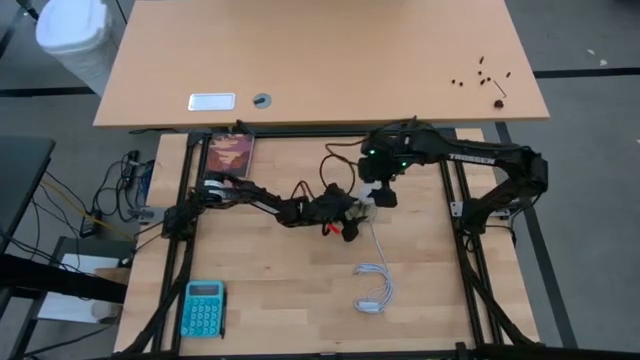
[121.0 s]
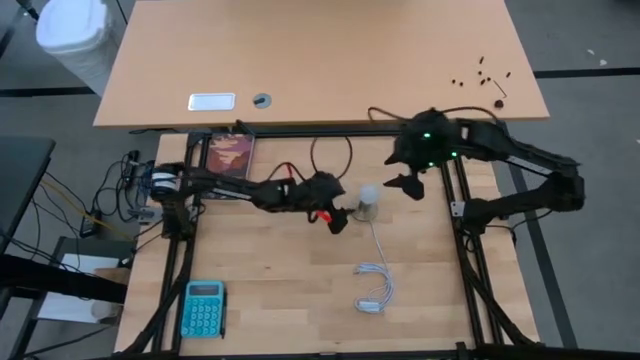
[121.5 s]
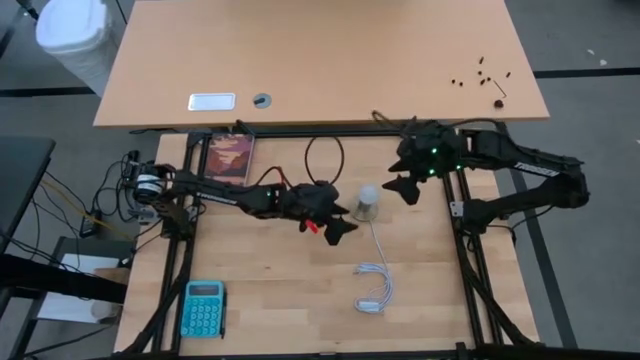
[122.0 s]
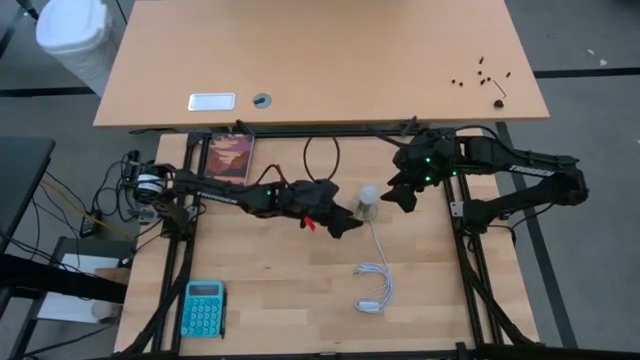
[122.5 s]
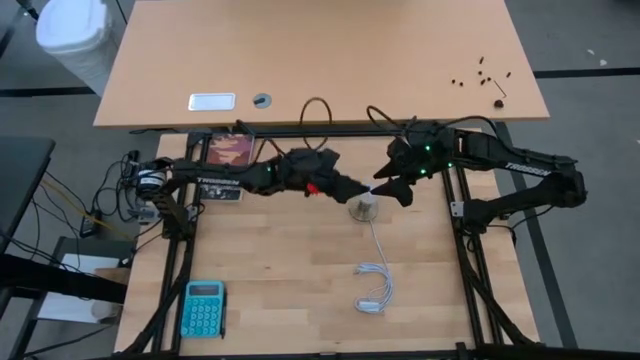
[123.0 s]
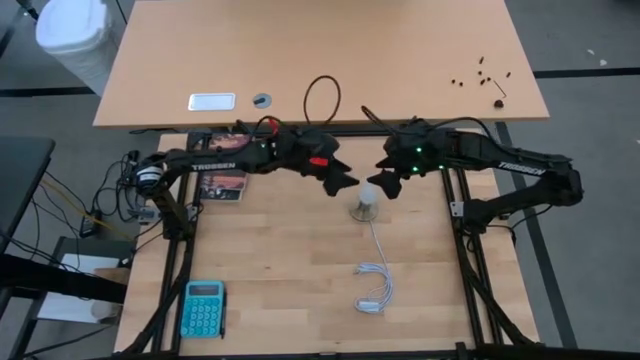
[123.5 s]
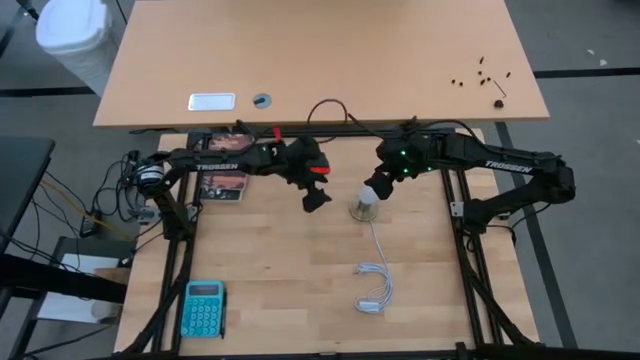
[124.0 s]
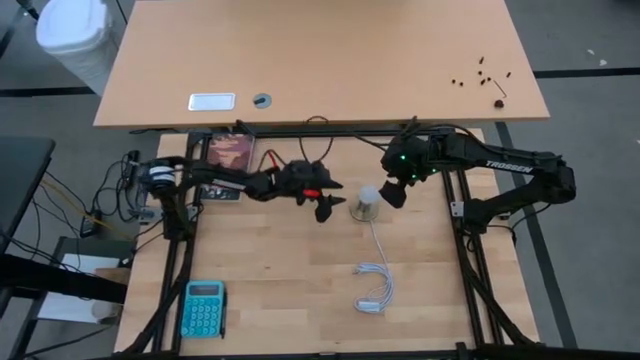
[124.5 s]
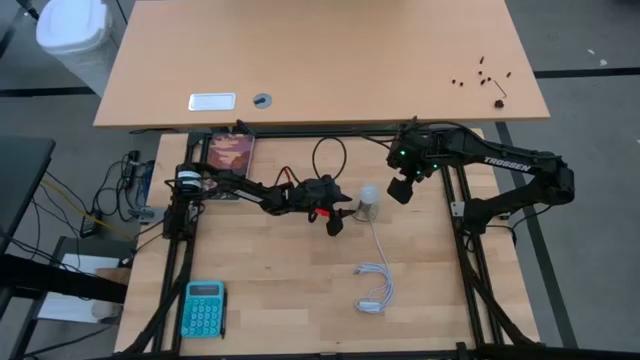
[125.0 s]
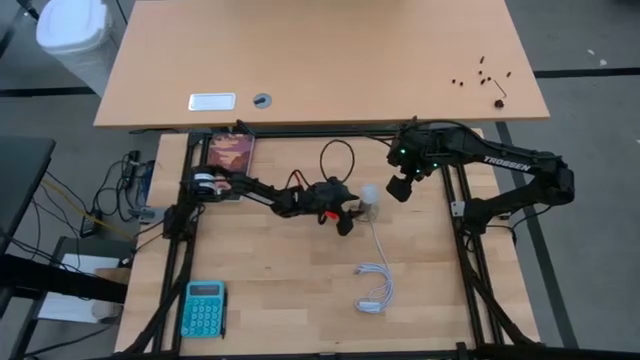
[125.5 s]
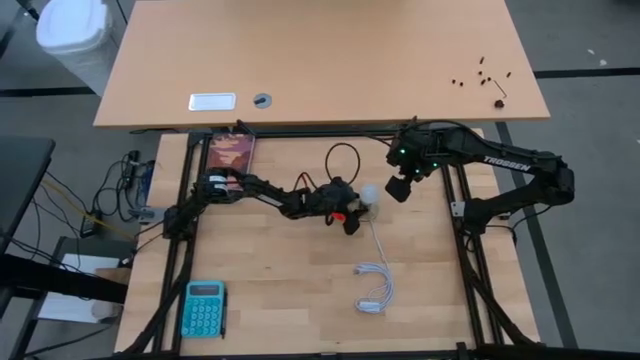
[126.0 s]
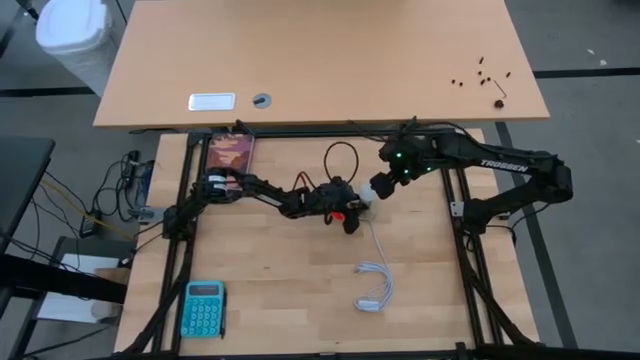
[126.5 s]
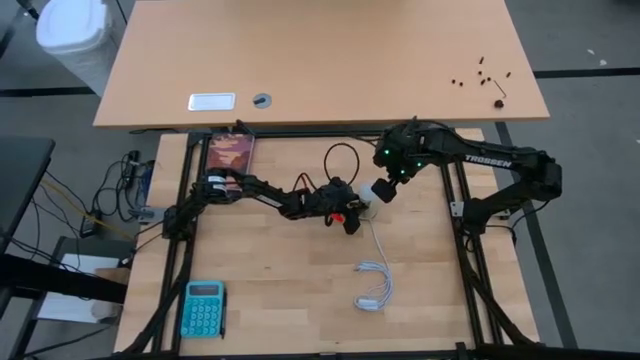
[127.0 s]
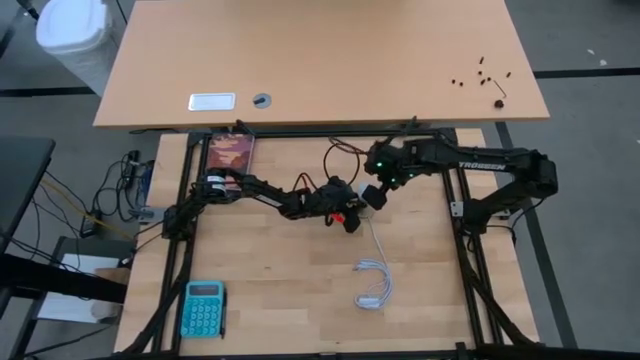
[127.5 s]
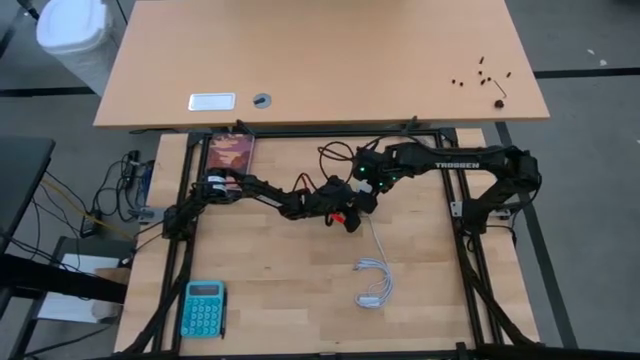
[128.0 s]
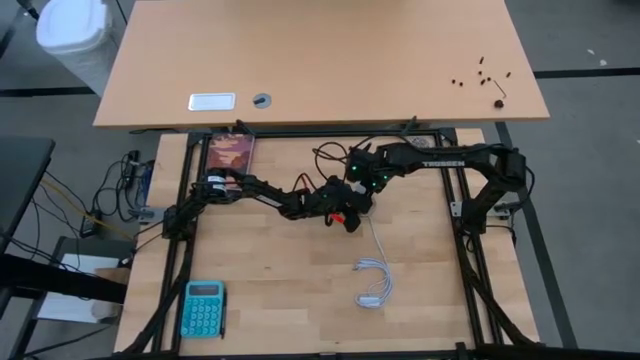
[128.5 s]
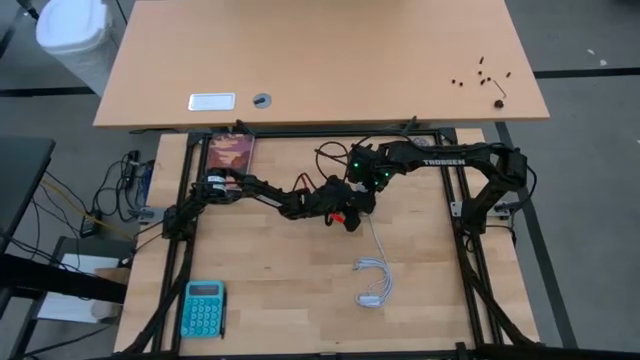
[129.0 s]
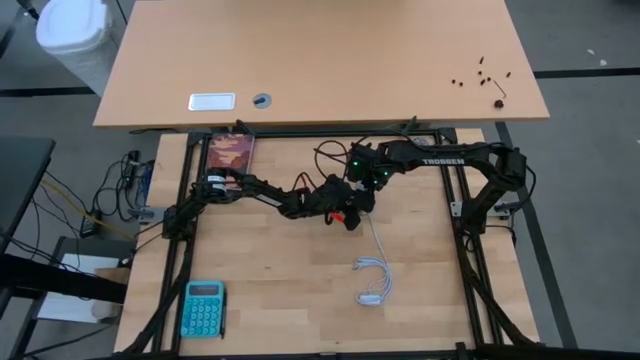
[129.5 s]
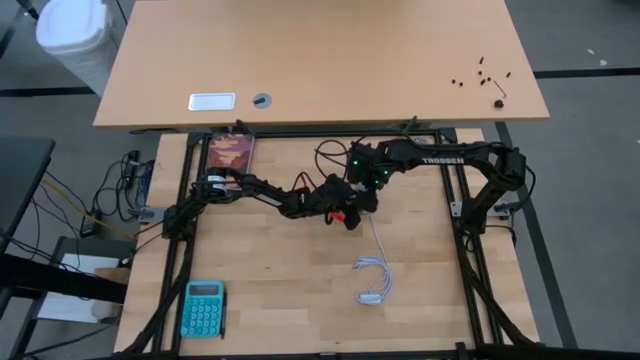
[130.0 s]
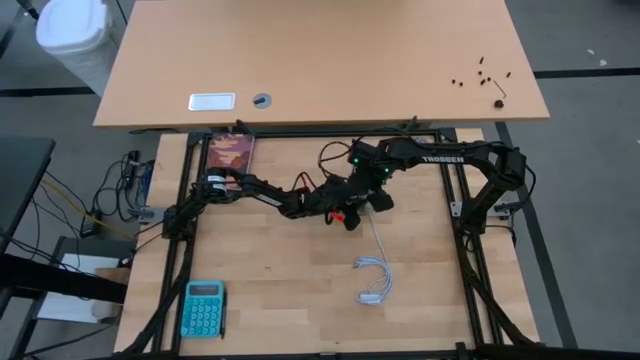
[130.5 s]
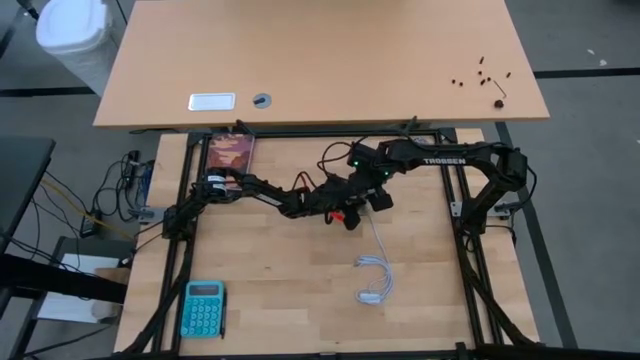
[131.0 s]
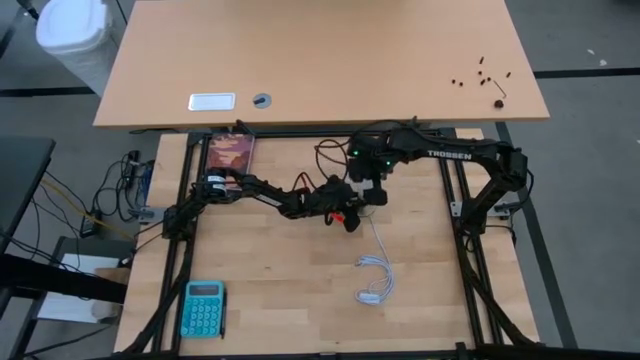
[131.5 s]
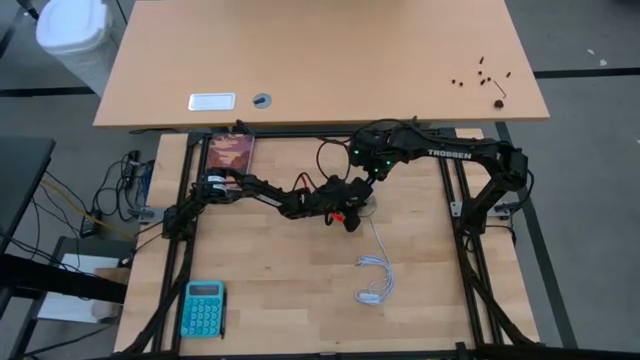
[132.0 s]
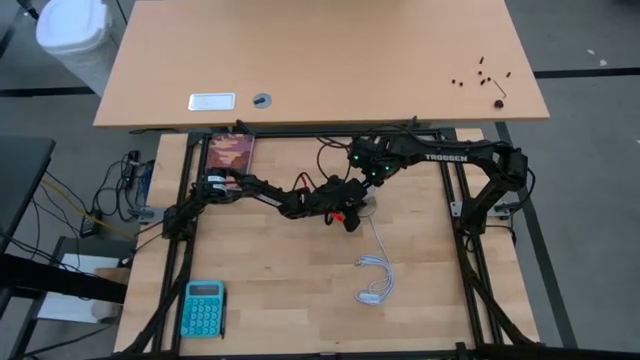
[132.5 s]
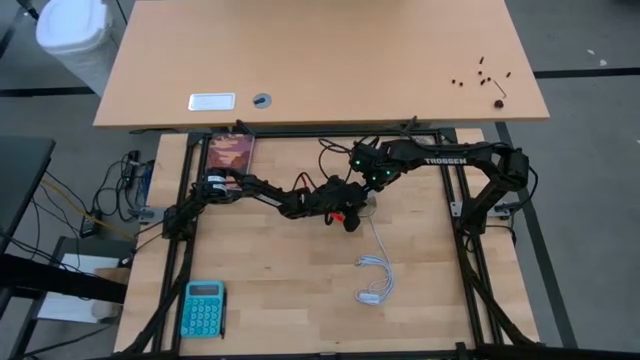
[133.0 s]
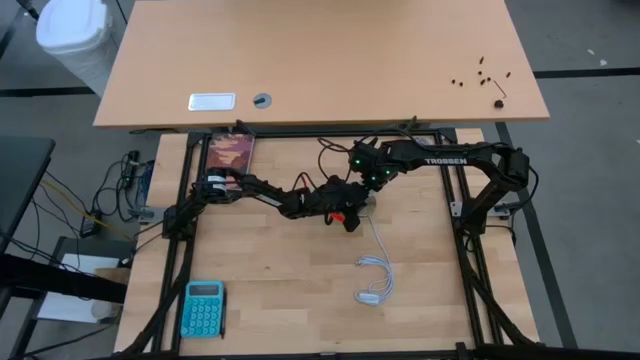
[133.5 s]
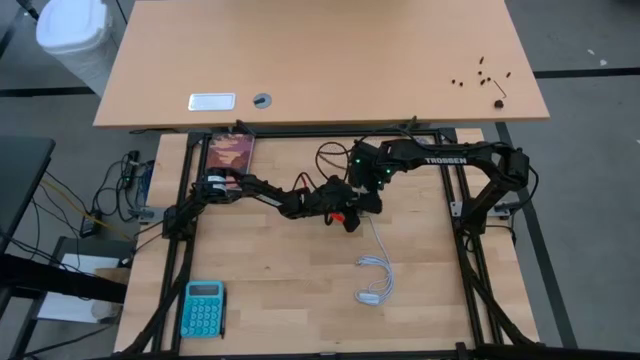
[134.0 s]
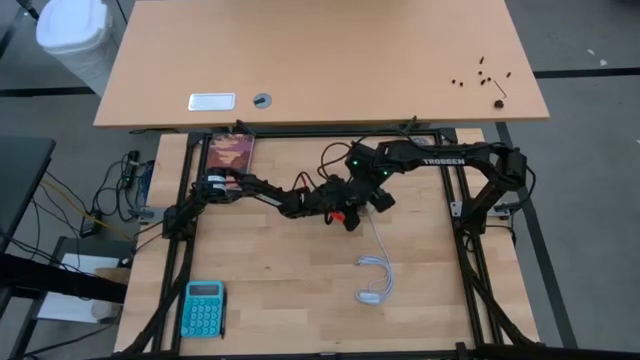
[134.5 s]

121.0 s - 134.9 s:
Task: Screw lightbulb
Remove the white lightbulb from the lamp

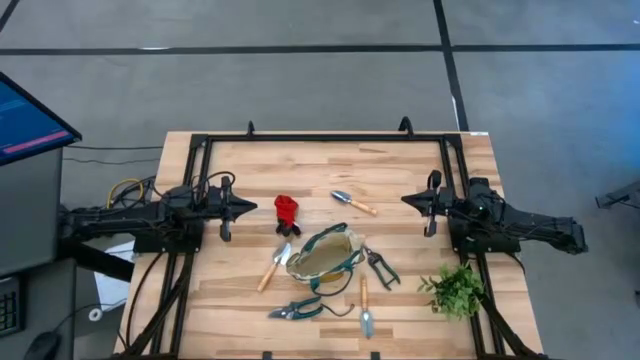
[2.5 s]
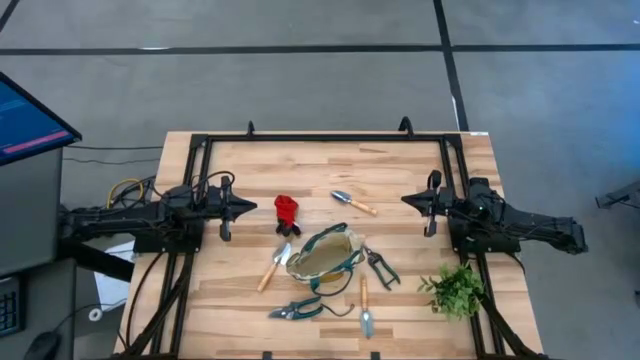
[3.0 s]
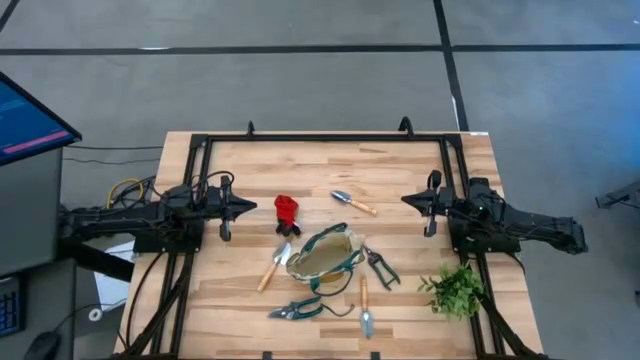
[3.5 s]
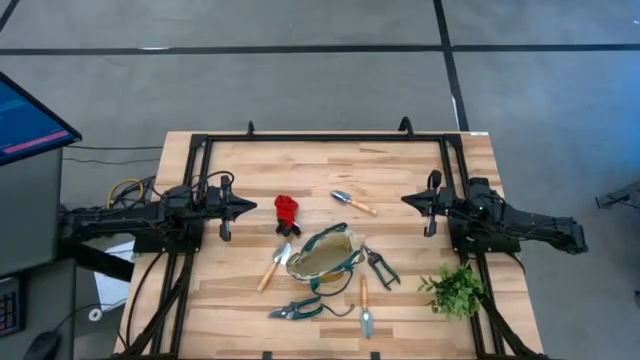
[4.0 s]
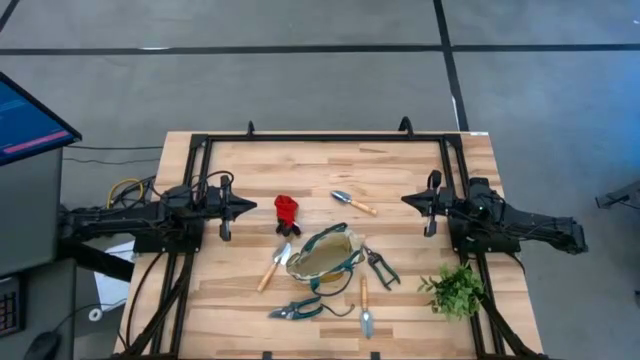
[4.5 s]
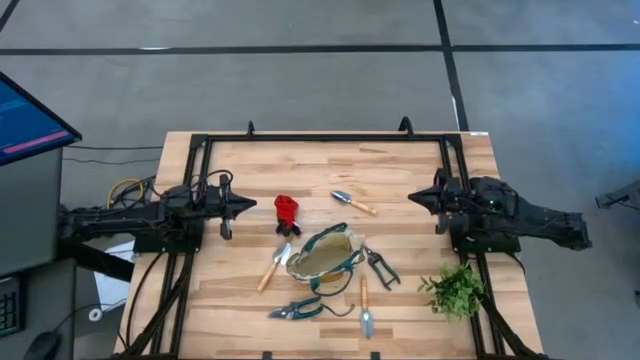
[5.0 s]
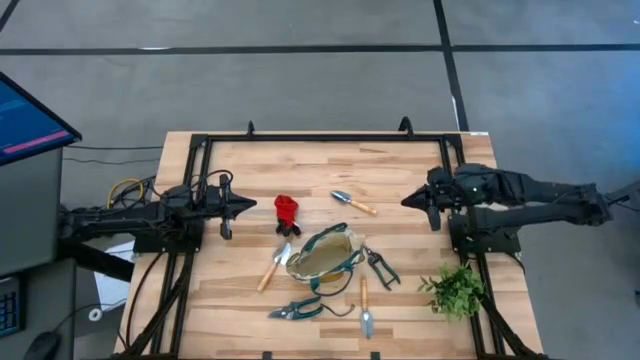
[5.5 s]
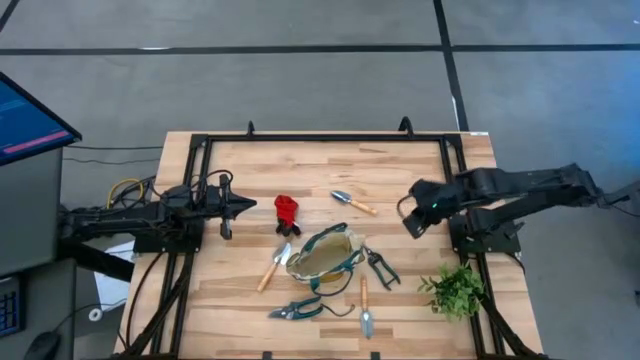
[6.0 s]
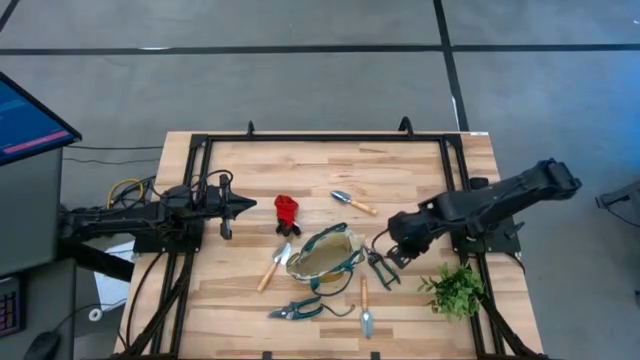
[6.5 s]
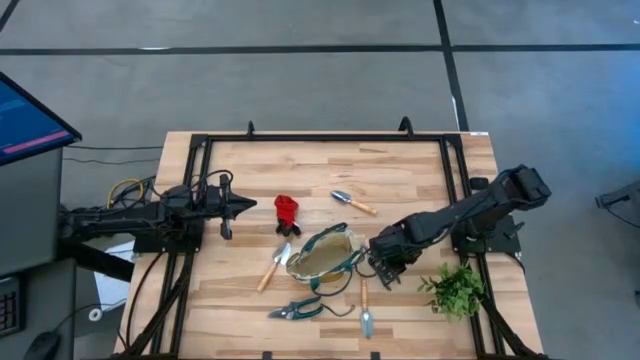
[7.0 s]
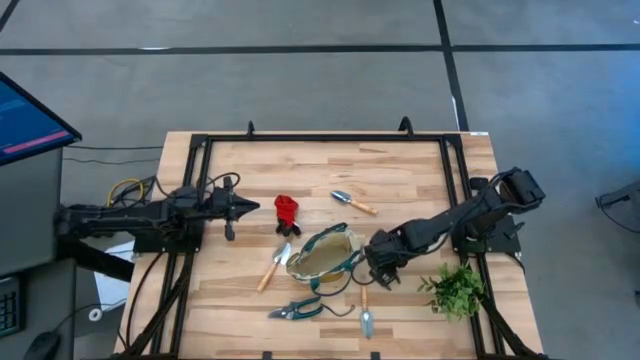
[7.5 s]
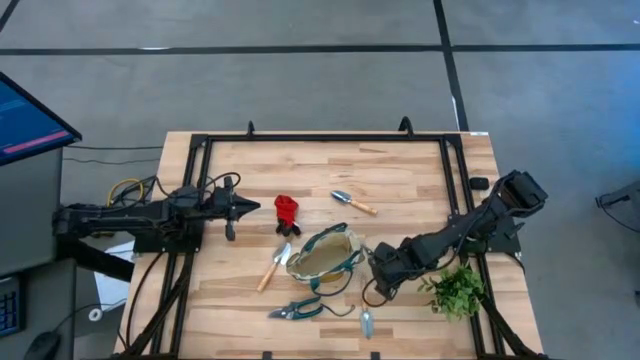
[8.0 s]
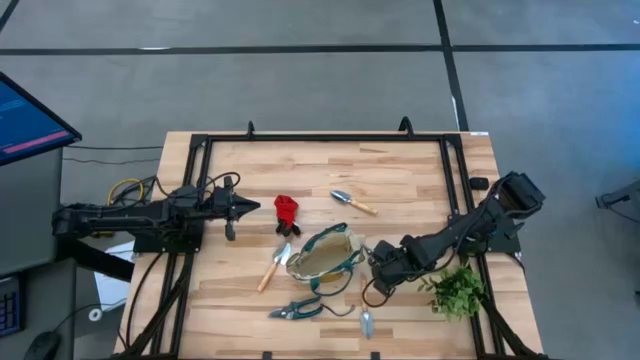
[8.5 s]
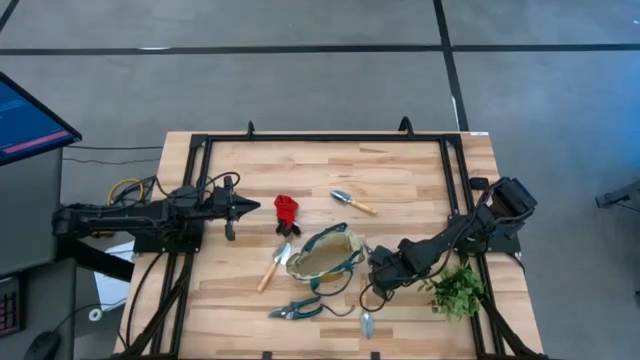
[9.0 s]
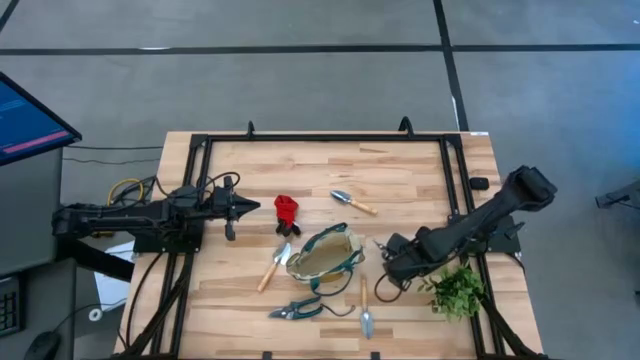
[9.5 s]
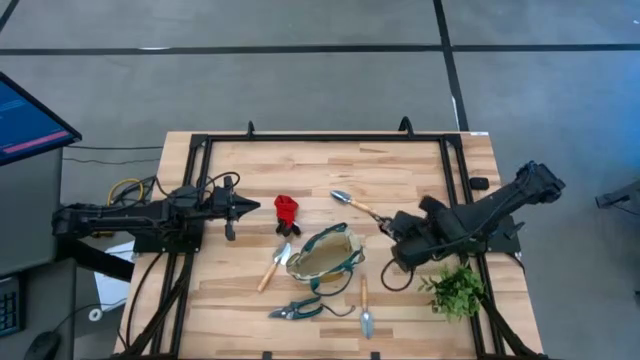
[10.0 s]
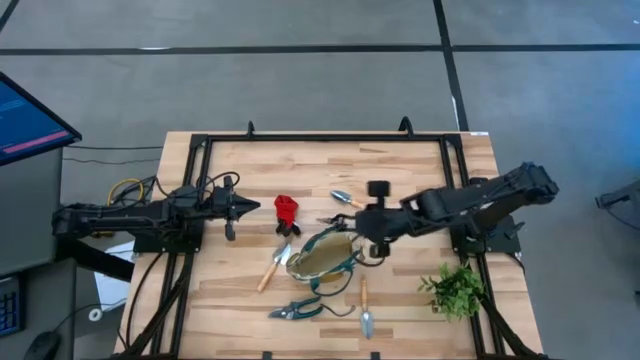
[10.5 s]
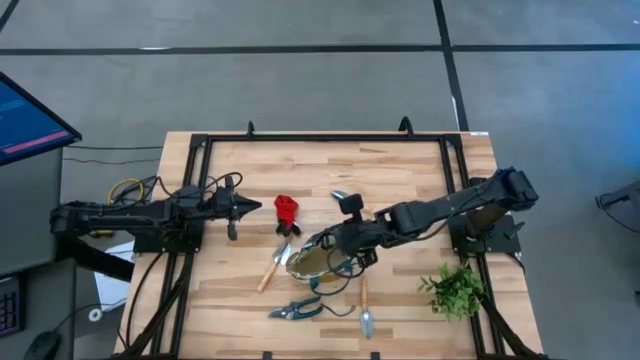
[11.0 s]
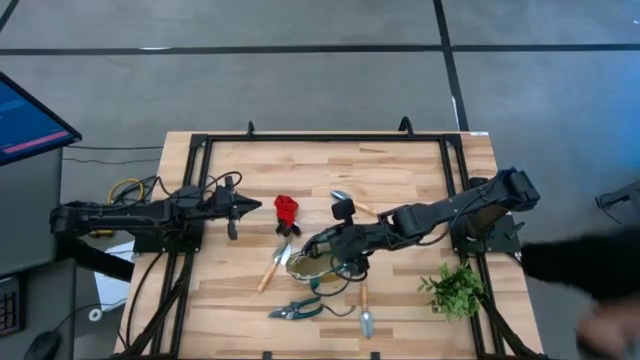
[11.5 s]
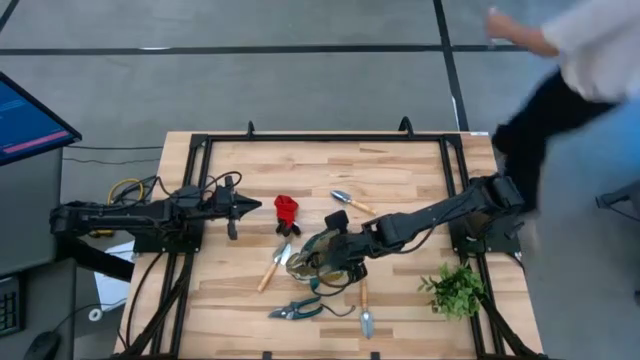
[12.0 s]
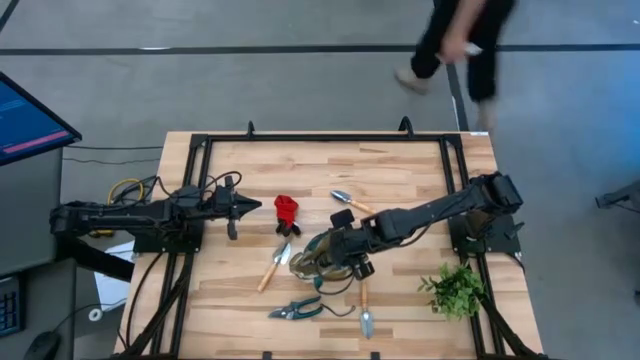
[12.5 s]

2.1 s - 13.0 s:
Task: Pick & Place Garden tools in Gardening bag
Put the top shear scissors into the gardening bag
